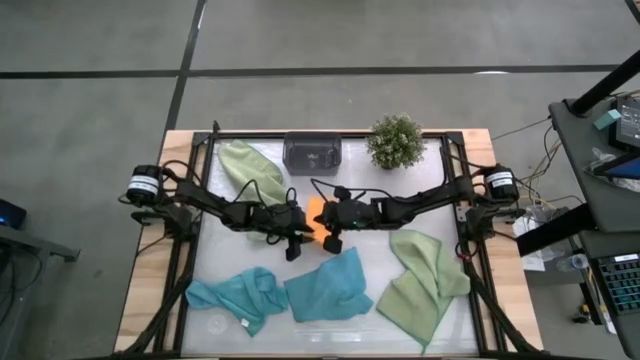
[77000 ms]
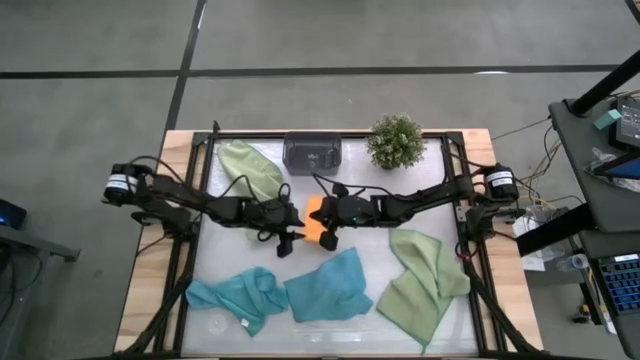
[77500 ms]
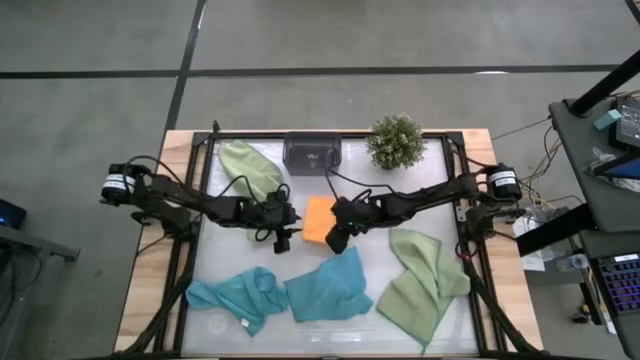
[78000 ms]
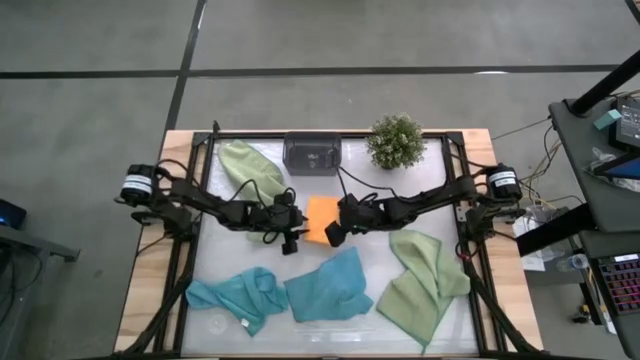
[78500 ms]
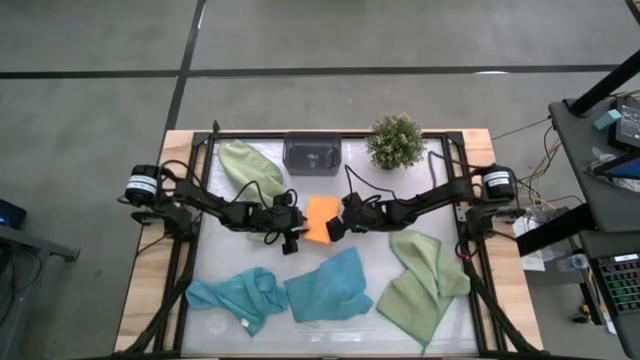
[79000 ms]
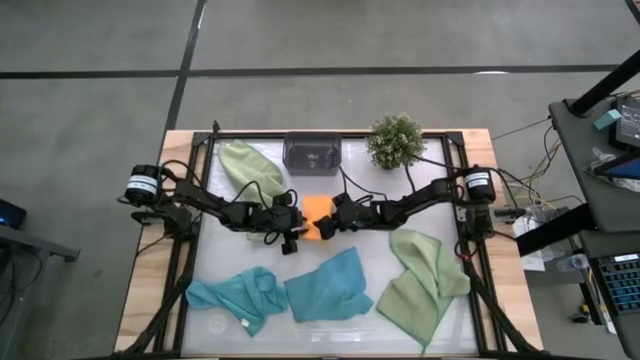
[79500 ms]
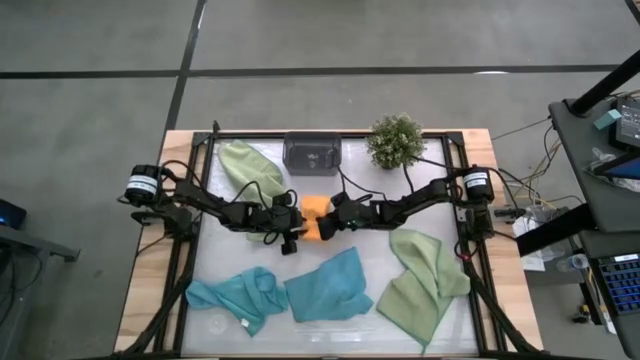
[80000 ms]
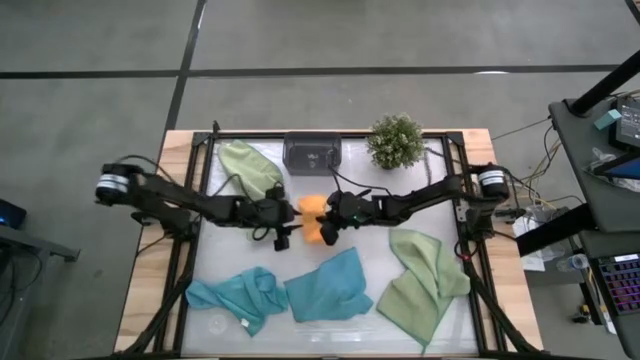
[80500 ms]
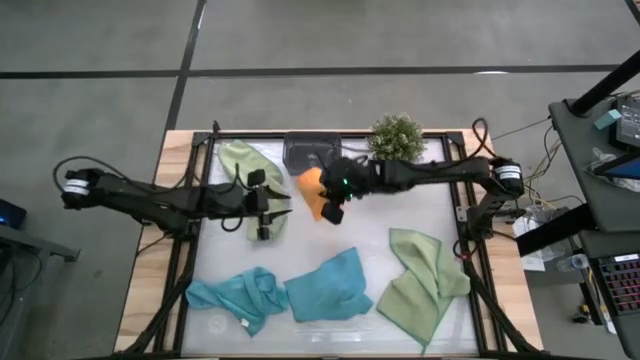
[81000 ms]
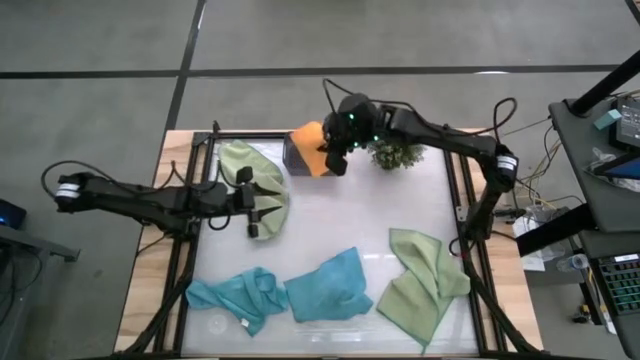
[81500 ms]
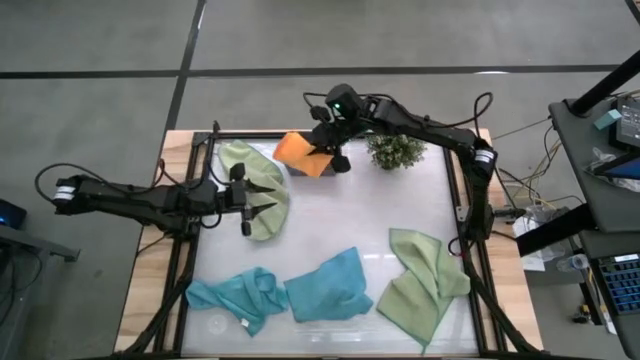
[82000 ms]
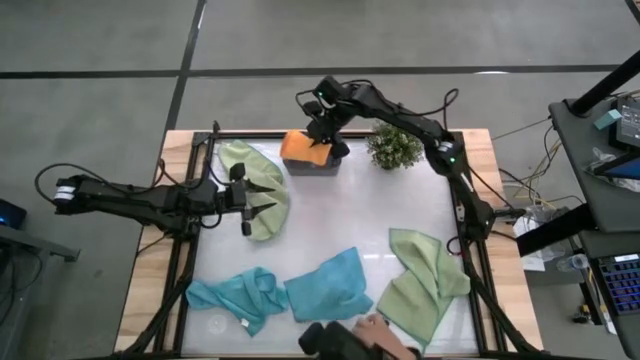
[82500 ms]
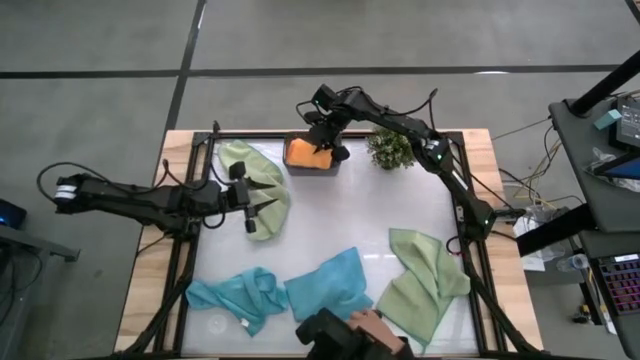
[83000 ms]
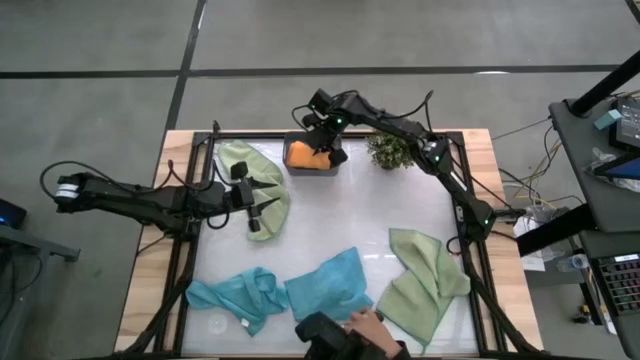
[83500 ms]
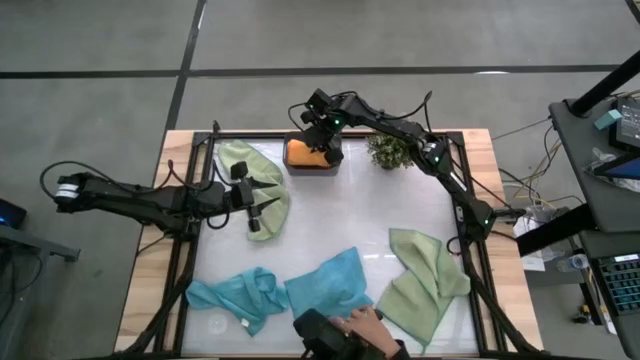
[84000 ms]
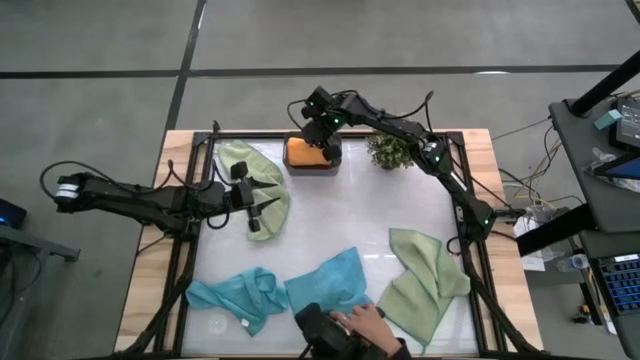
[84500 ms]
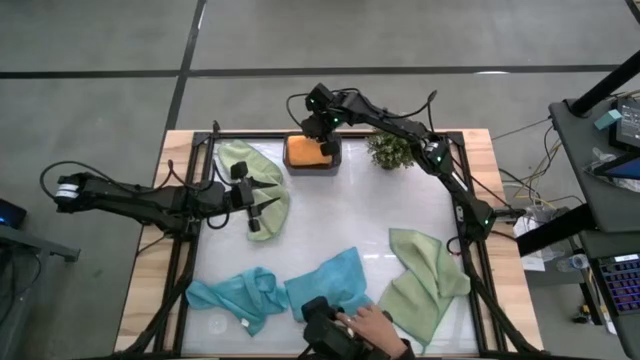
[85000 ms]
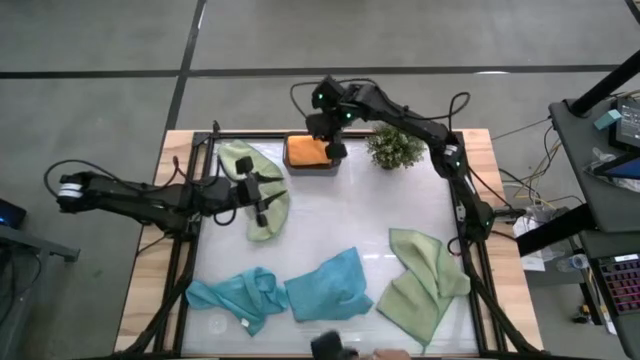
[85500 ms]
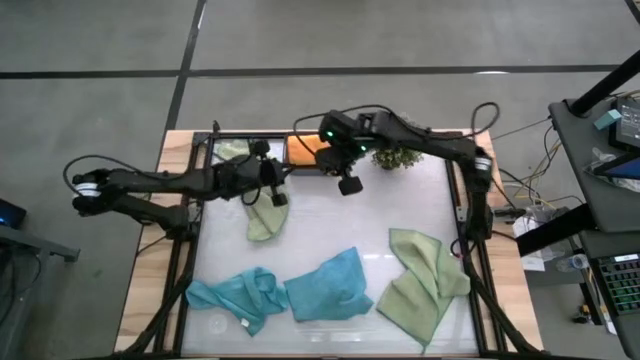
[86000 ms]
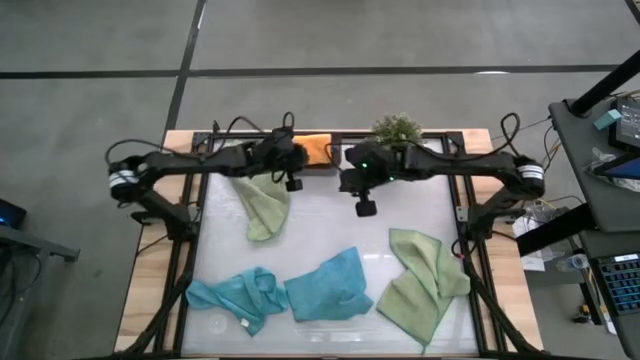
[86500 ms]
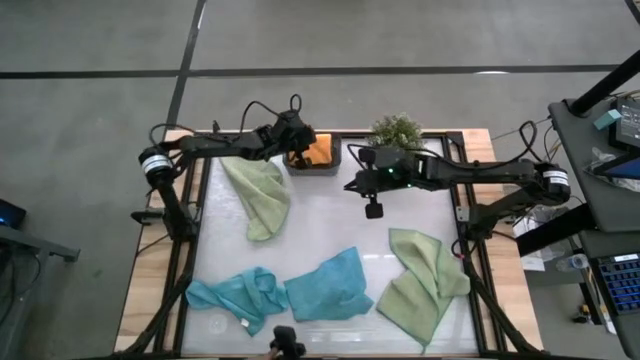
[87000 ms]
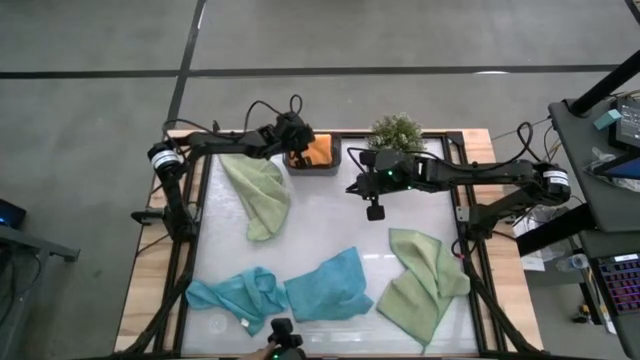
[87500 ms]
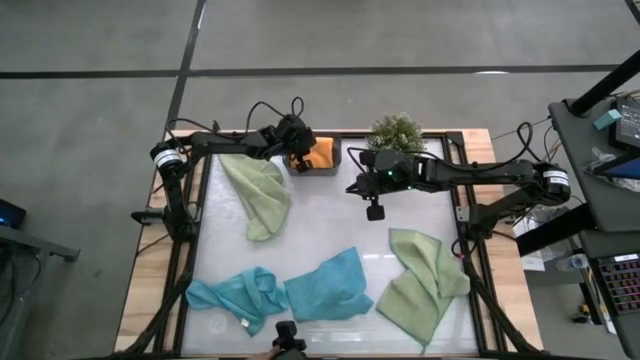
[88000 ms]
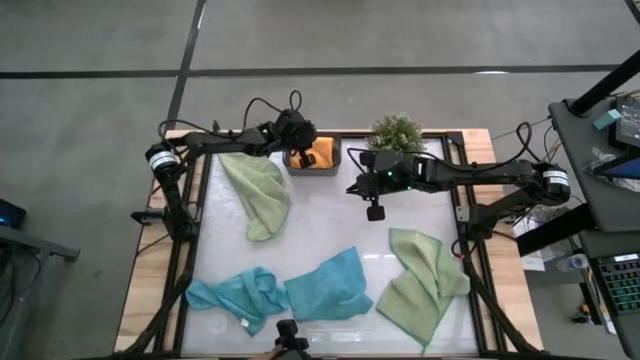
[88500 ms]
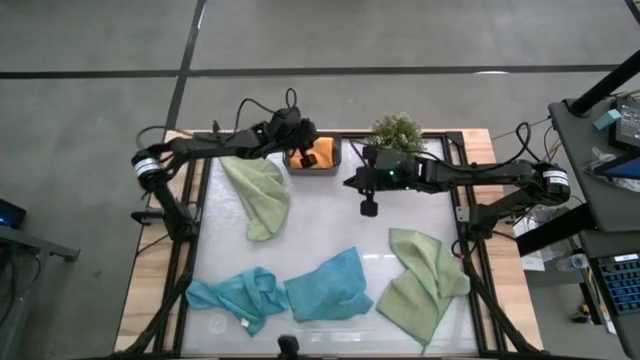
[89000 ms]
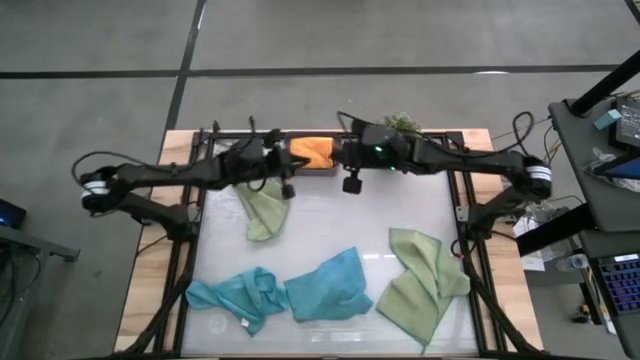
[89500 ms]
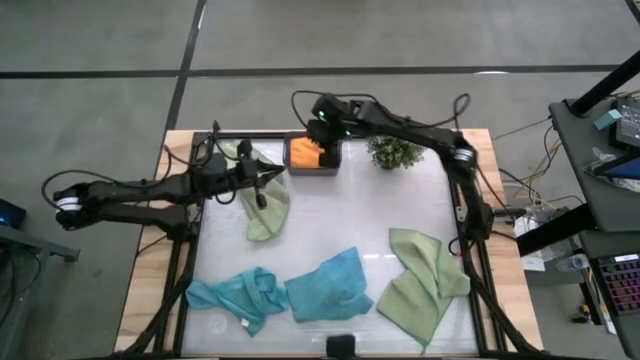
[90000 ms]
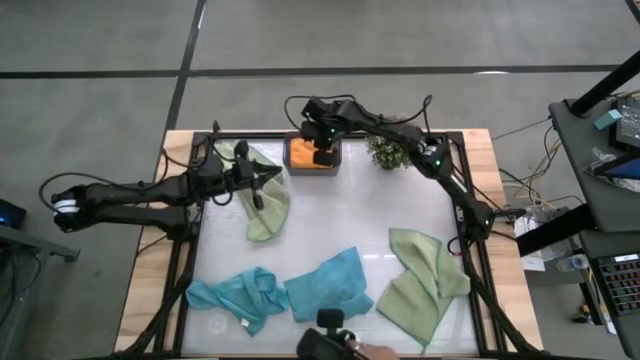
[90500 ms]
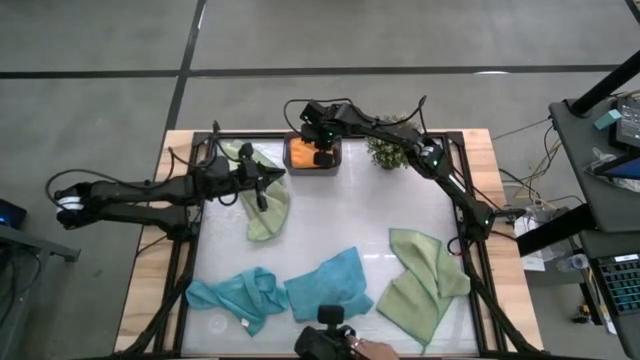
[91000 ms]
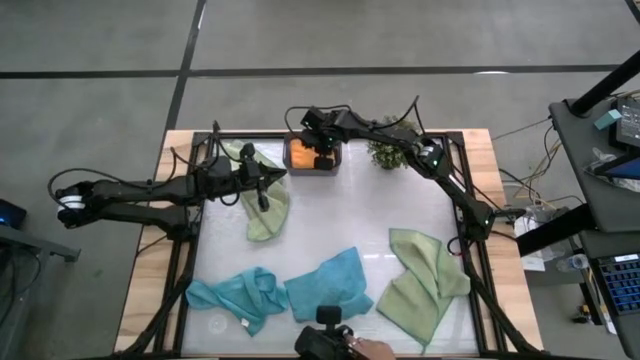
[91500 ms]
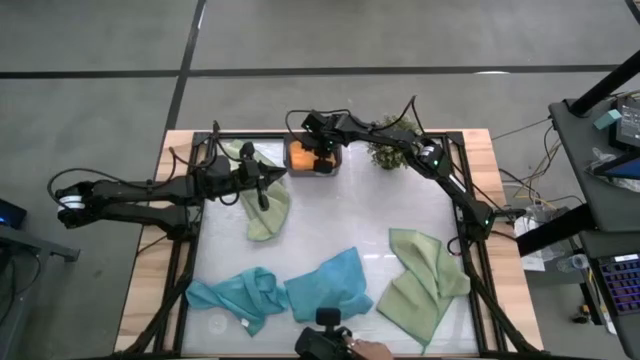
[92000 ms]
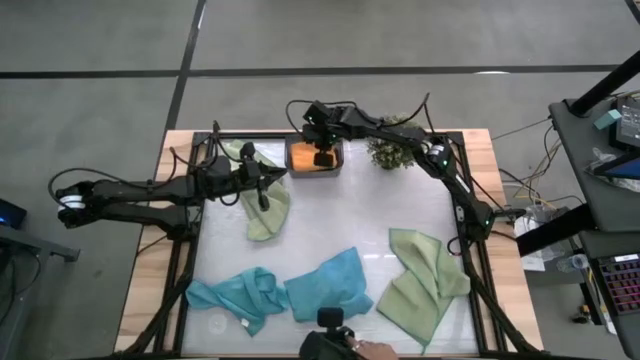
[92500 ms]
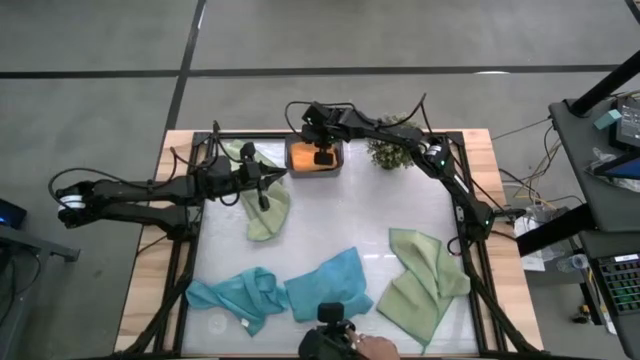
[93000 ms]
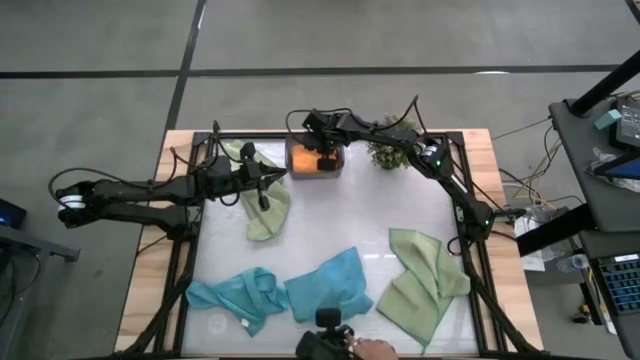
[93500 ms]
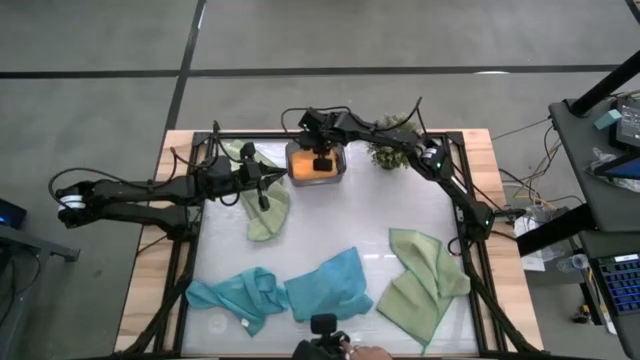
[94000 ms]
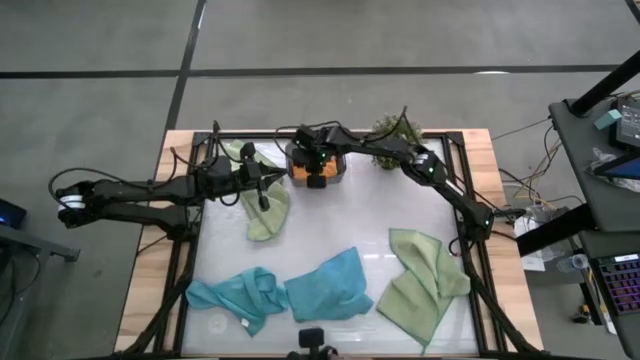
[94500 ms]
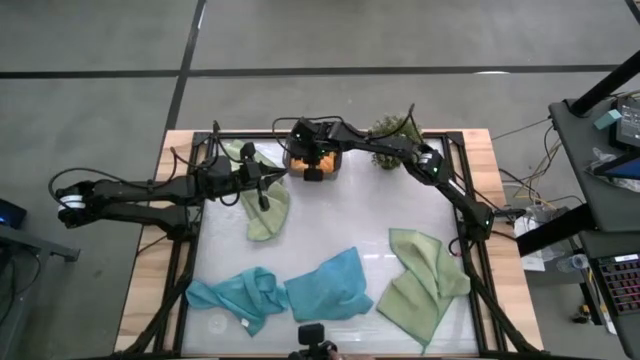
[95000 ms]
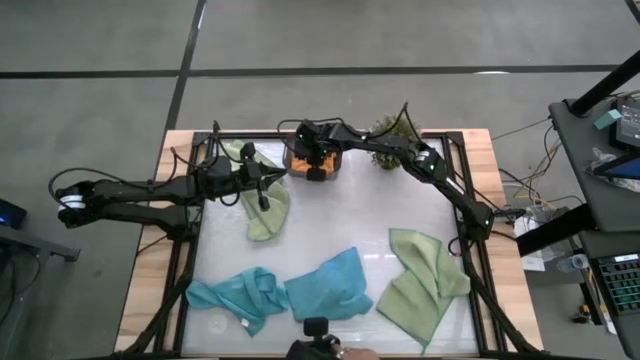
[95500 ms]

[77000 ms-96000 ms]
Task: Fold microfiber towels
Put the folded orange microfiber towel into the black bin

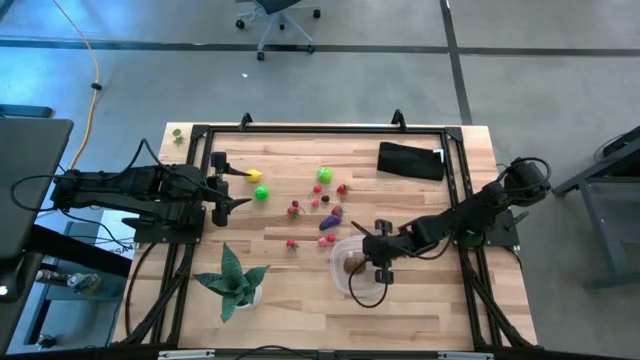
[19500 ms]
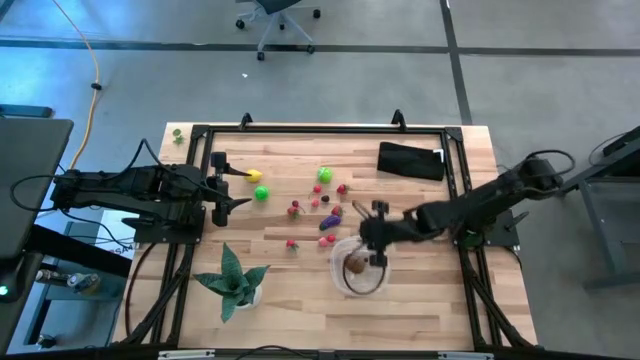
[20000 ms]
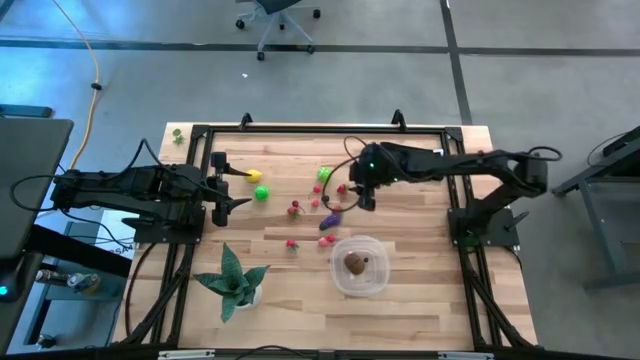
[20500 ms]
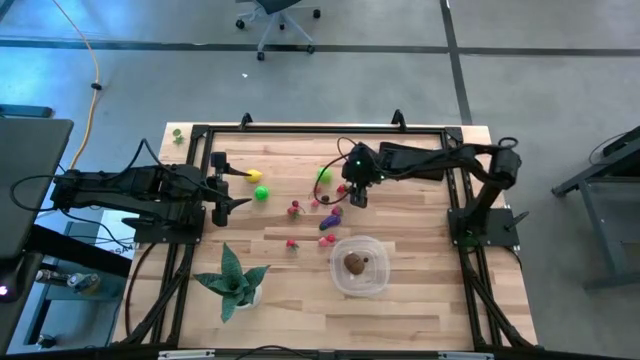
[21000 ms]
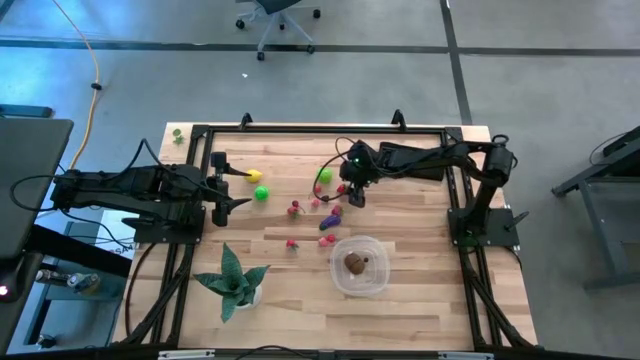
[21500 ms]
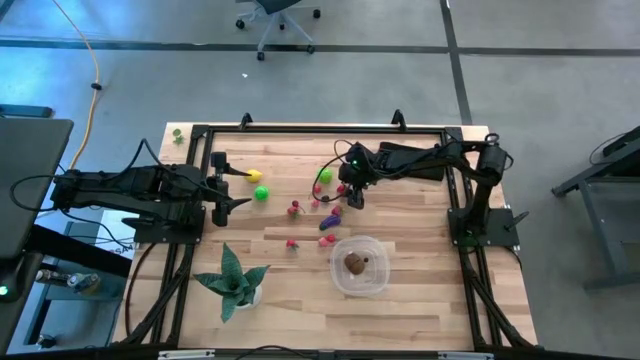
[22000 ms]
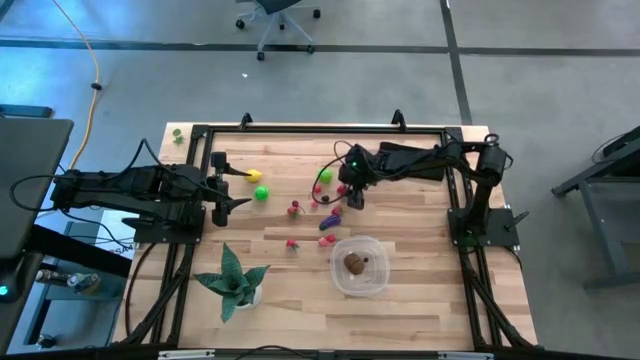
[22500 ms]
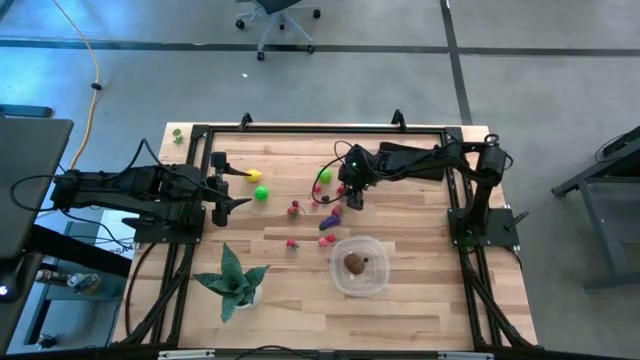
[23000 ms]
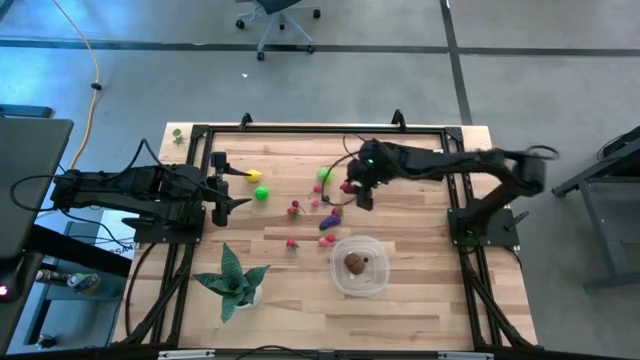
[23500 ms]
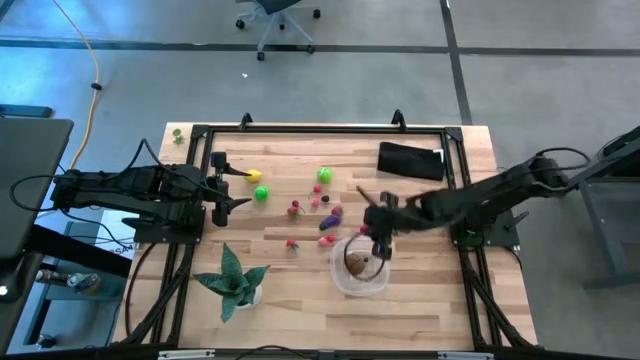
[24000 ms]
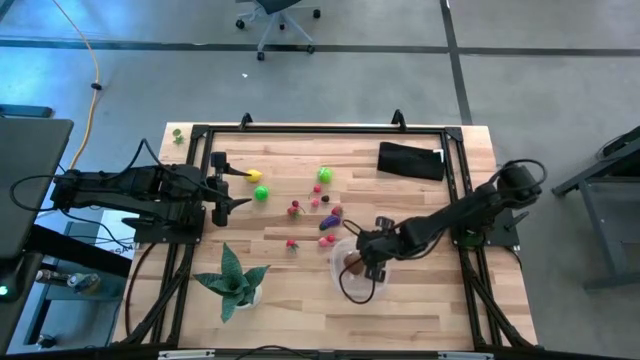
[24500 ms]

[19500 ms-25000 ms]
Task: Pick and placing Produce into tupperware
Put the strawberry into the transparent bin
